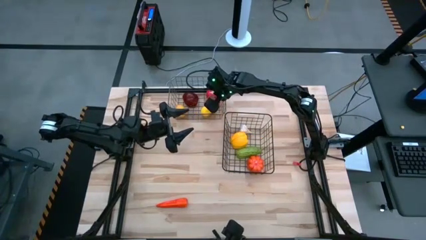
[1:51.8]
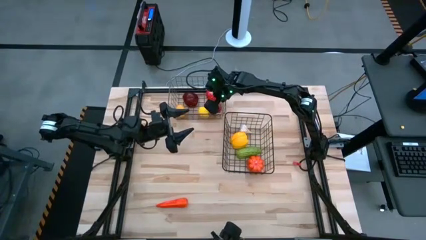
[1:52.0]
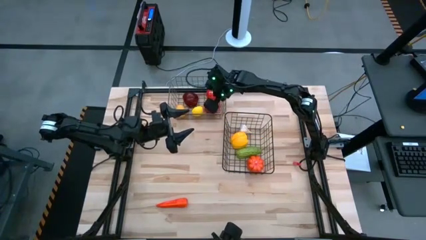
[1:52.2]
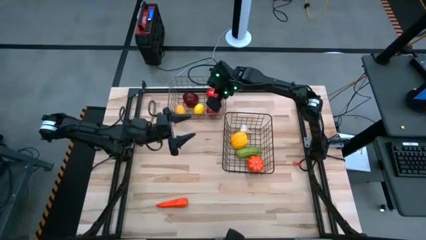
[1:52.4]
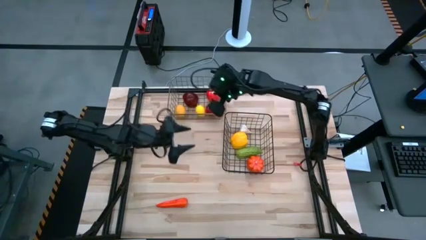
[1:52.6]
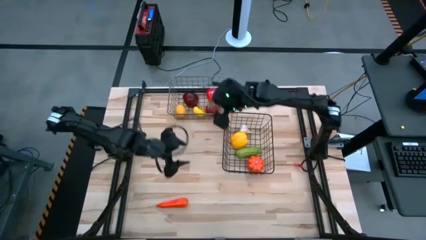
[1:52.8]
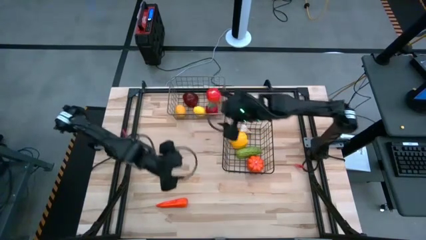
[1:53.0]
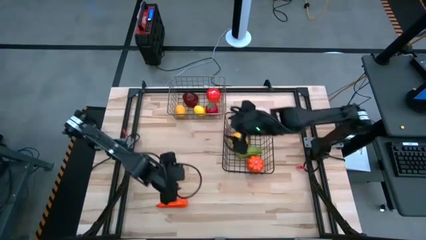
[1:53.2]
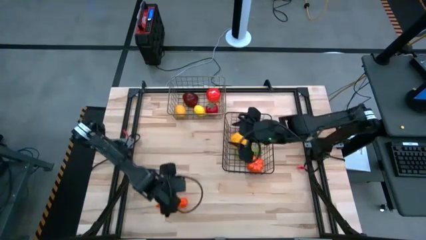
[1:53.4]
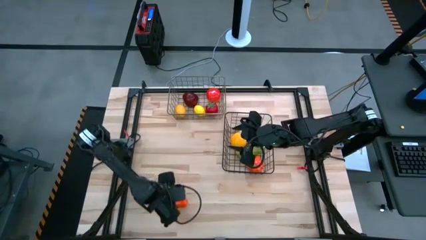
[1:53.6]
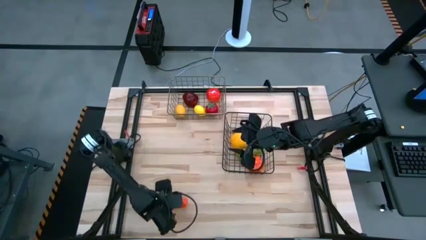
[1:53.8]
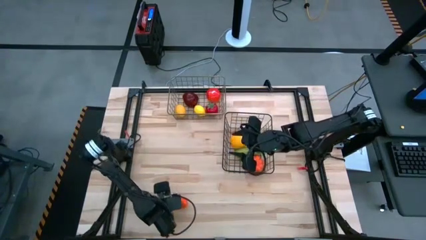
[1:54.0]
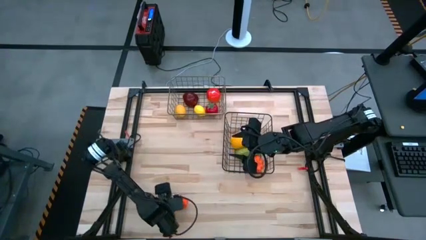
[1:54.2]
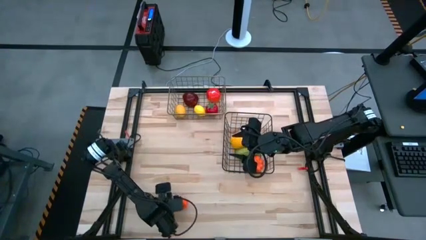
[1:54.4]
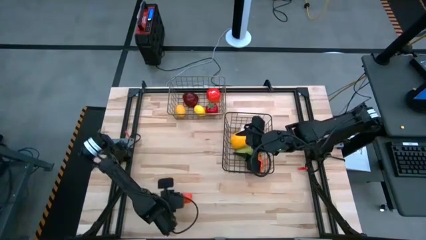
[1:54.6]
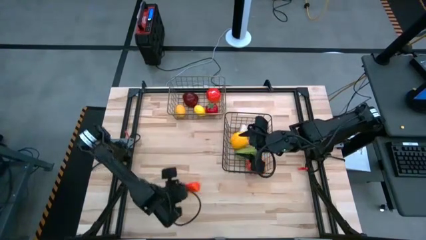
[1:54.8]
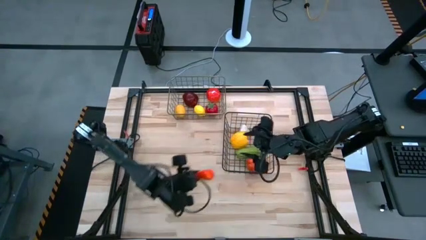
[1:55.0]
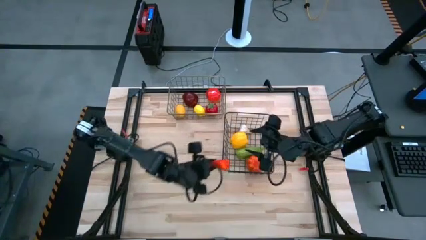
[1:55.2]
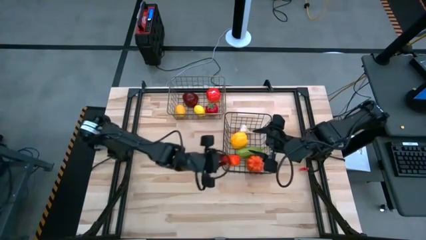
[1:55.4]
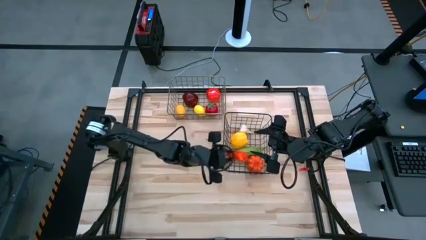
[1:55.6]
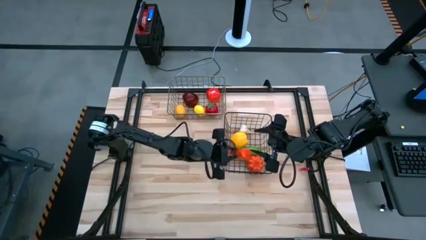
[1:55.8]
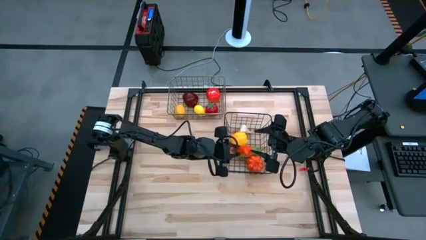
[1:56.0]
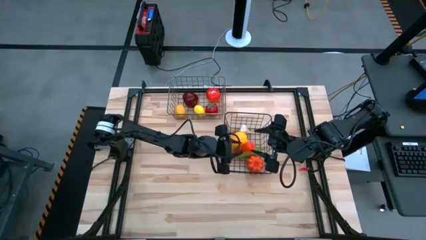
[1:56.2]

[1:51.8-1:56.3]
Task: Sort produce into baskets
Put the orange carrot into the black wire basket

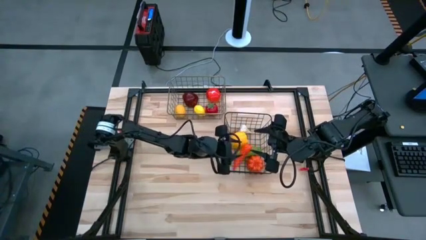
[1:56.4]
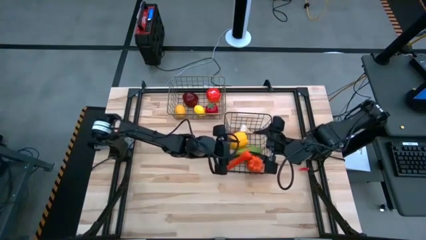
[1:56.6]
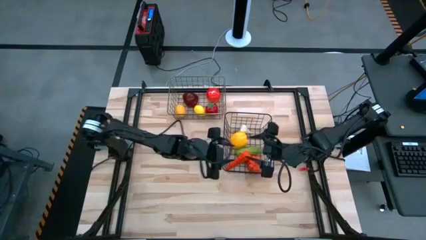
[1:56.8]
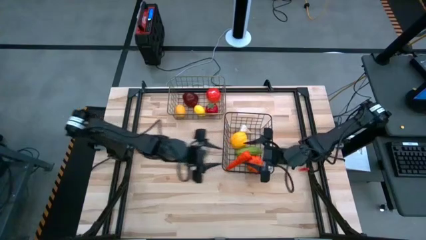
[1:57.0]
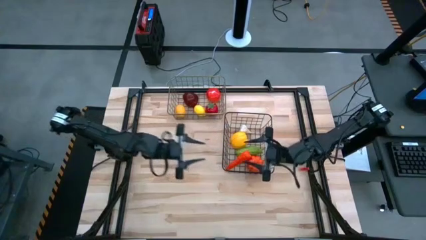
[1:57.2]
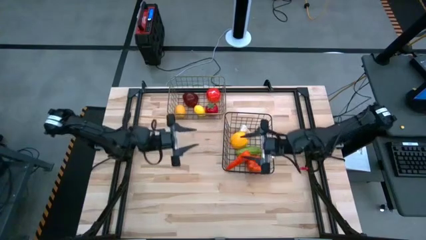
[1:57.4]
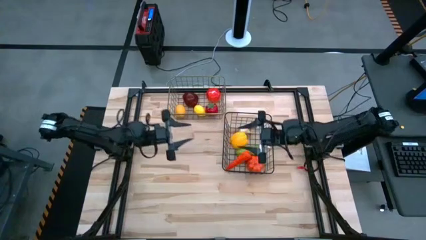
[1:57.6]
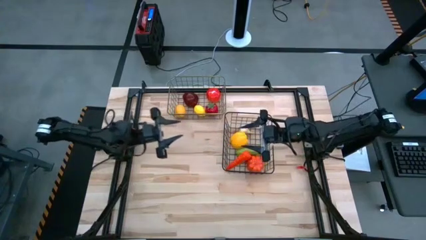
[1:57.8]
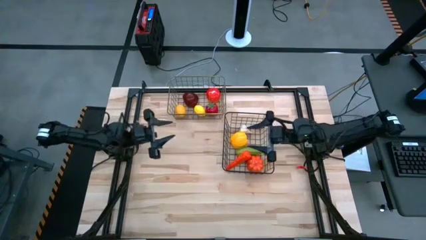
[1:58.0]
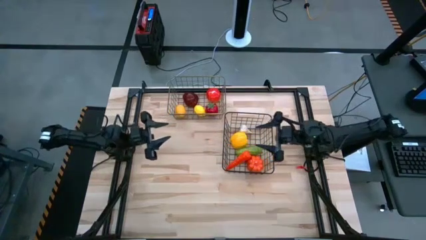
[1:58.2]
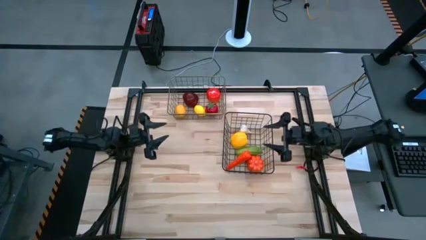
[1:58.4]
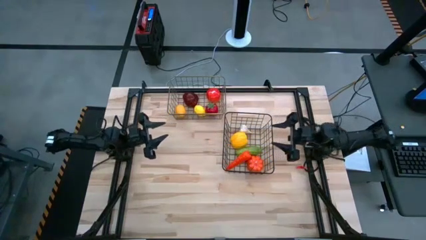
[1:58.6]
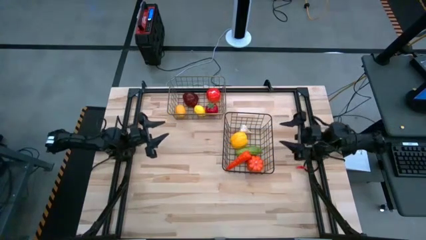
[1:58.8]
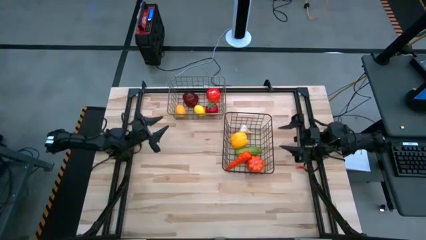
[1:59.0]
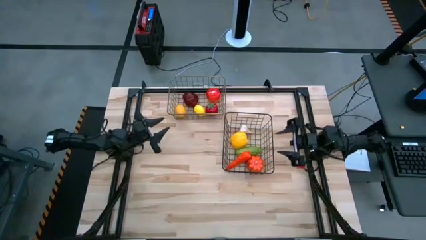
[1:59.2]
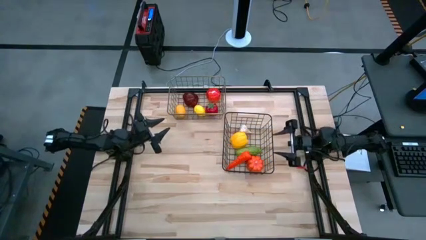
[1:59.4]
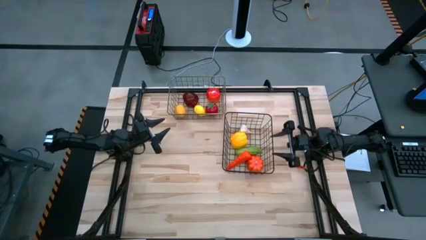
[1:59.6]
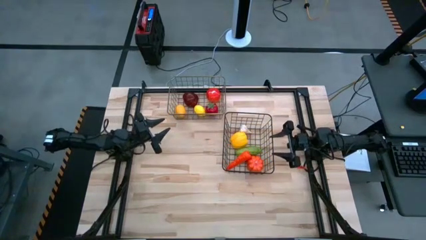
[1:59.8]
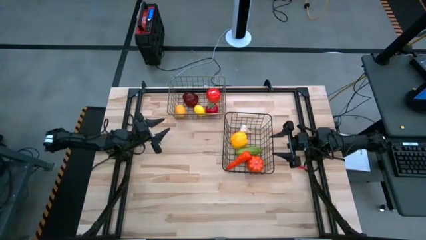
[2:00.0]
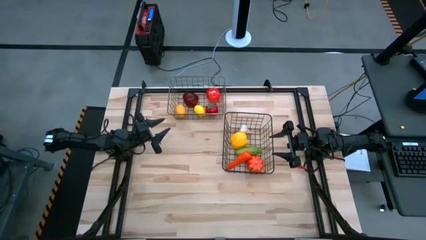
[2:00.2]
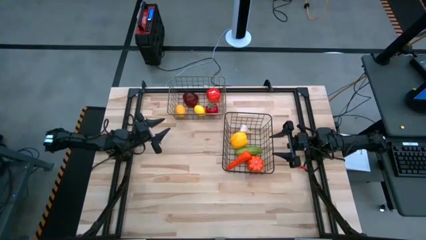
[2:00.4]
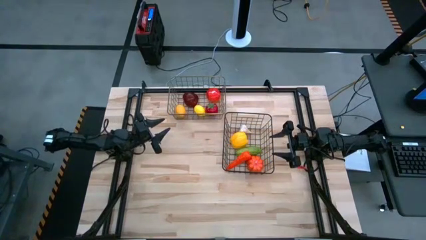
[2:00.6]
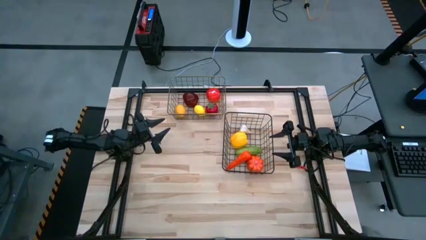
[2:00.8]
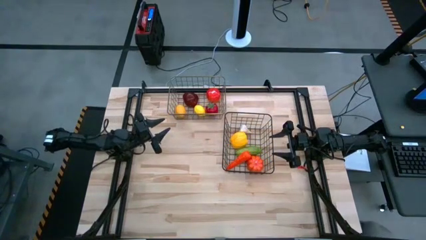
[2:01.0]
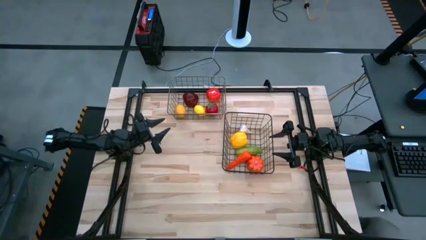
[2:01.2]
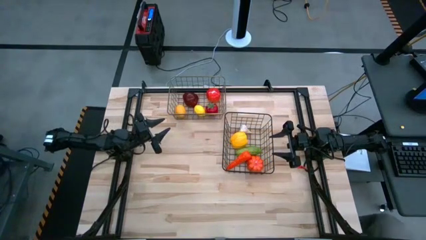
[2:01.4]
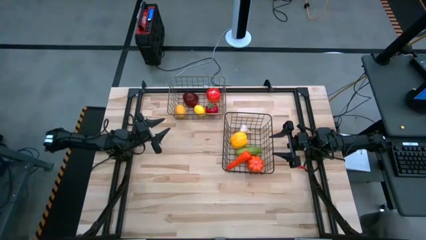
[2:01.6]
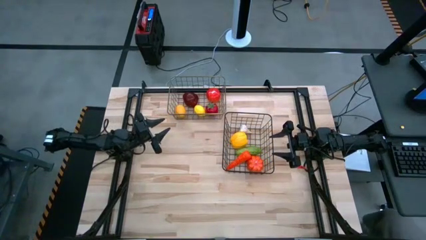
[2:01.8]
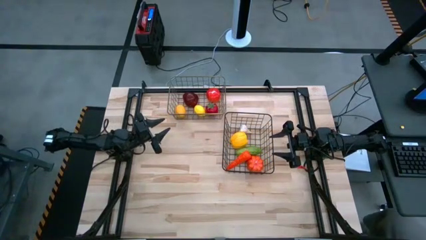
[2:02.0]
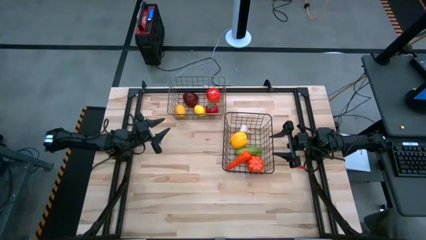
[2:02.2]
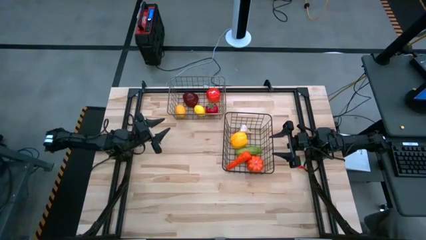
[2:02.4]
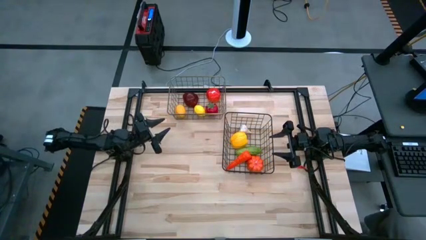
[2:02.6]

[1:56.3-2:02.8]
Return to Home Position

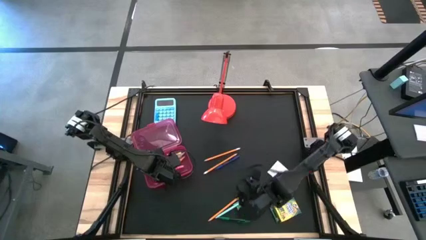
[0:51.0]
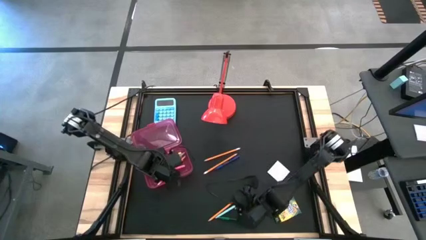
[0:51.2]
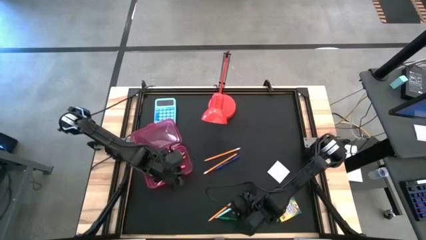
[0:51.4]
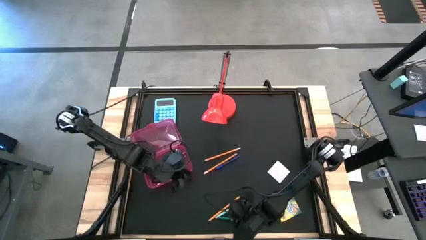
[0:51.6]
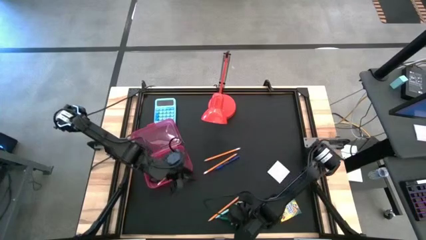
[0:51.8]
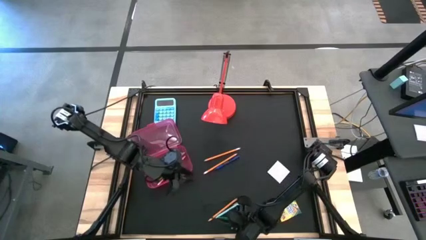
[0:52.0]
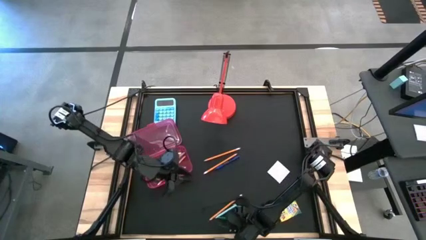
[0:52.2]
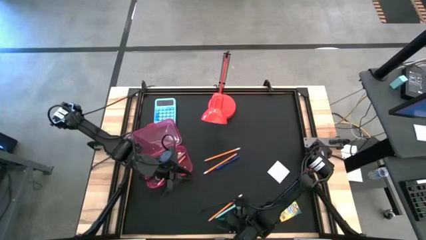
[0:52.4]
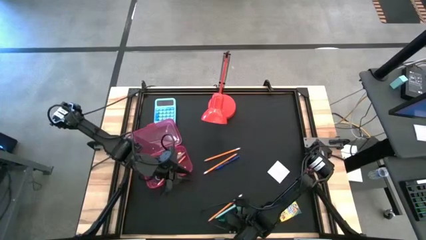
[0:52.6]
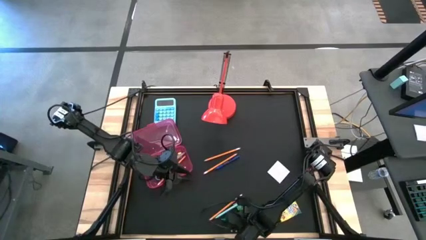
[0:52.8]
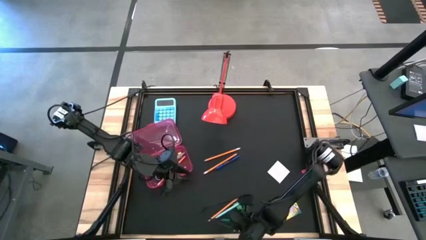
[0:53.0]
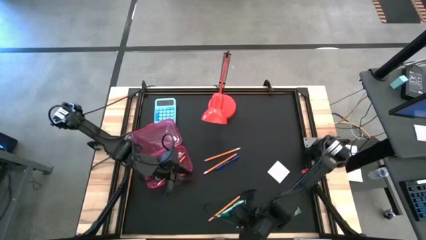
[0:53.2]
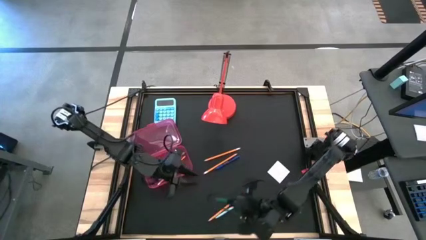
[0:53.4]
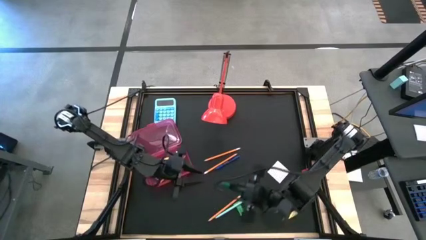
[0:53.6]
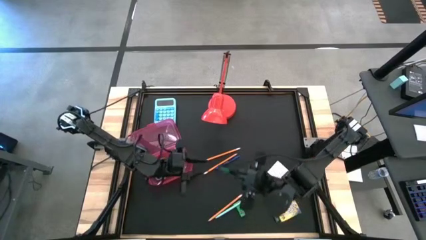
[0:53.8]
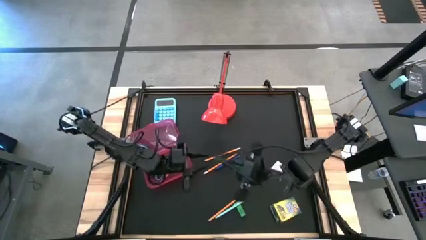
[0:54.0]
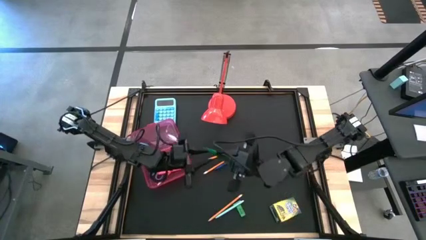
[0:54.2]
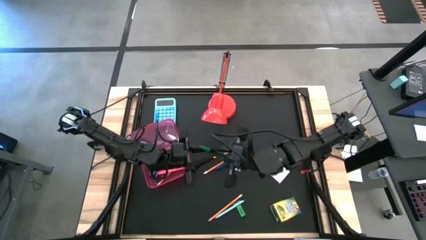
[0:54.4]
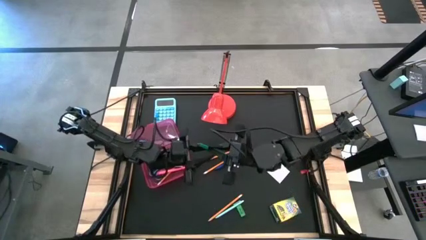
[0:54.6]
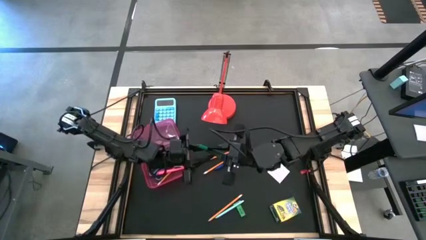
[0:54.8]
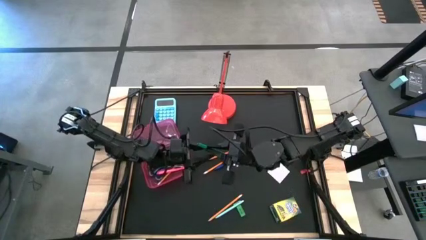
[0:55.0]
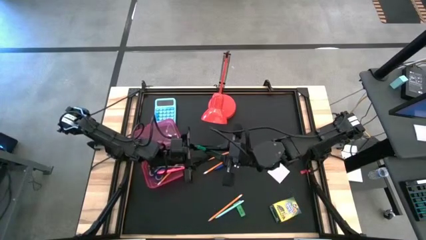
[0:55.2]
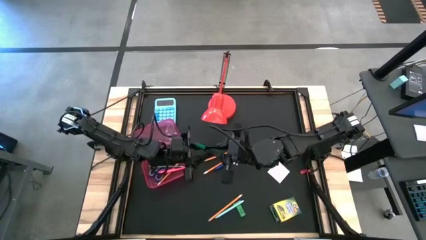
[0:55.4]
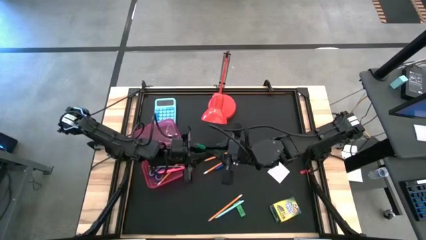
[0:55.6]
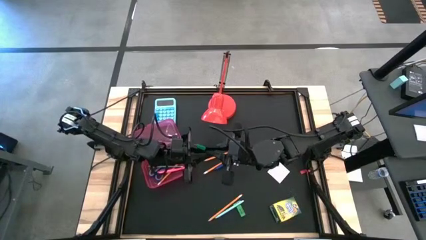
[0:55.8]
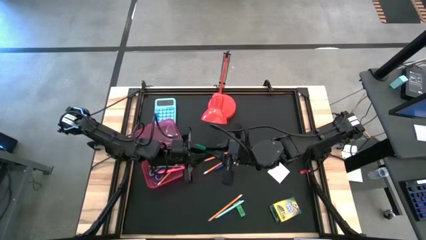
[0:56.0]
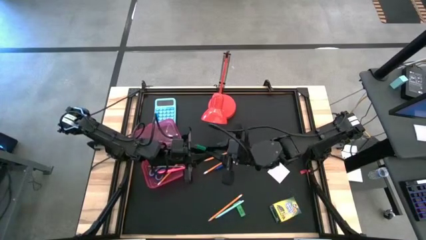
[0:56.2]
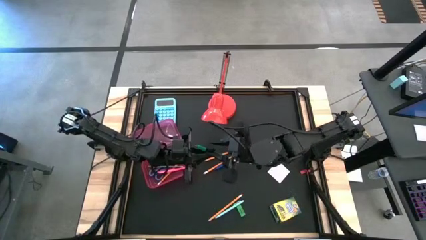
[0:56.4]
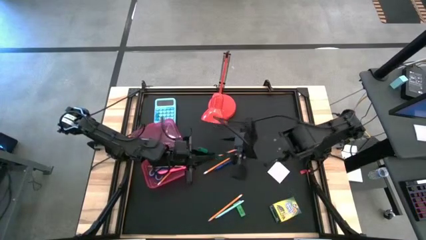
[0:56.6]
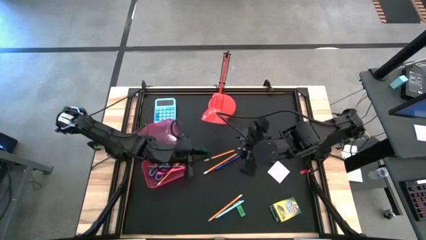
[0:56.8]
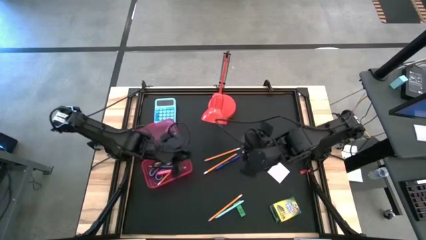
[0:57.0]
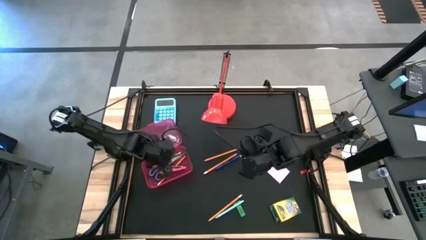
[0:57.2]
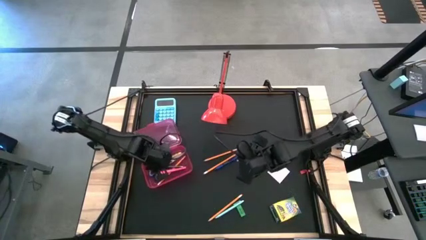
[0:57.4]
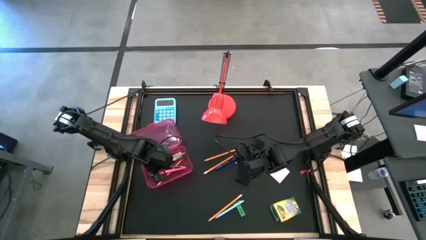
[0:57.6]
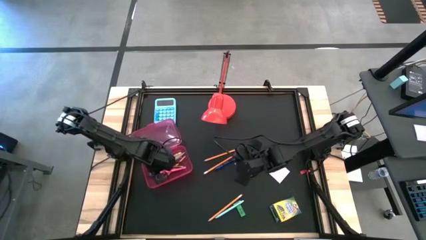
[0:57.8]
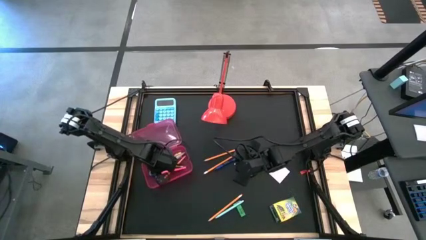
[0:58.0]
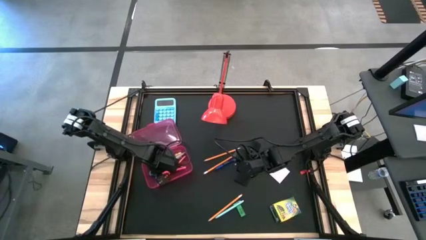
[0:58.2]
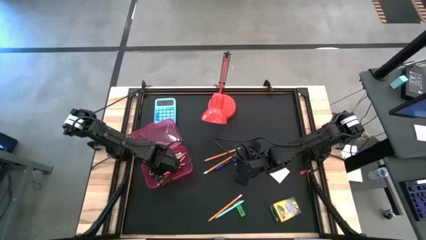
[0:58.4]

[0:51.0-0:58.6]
Task: Pack school essentials
Put the green pen into the red supply box
